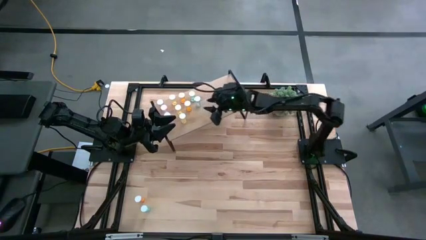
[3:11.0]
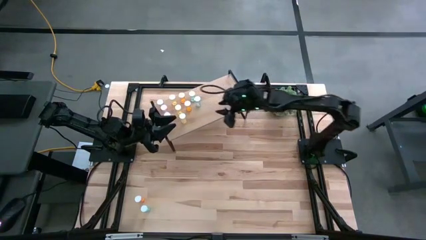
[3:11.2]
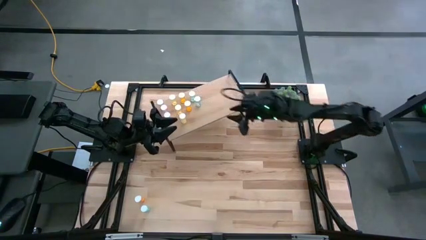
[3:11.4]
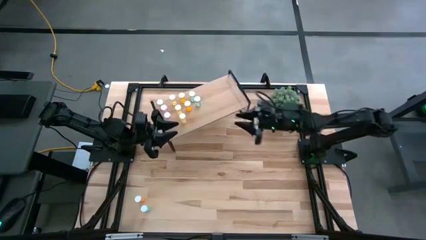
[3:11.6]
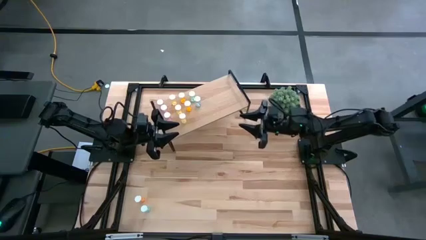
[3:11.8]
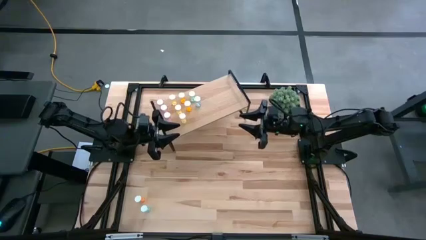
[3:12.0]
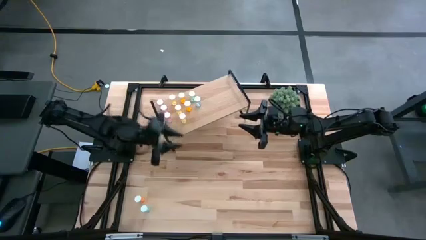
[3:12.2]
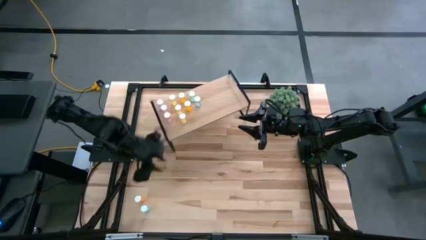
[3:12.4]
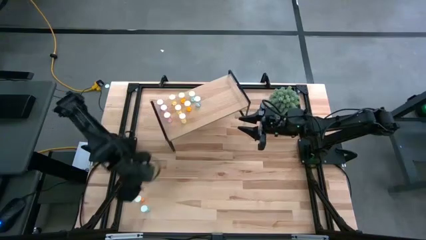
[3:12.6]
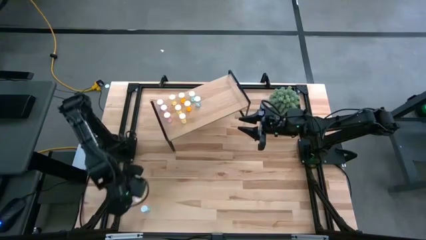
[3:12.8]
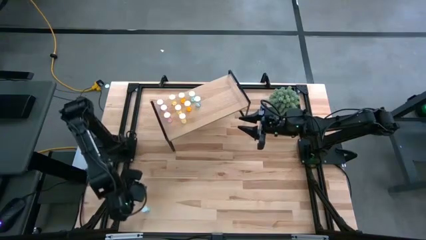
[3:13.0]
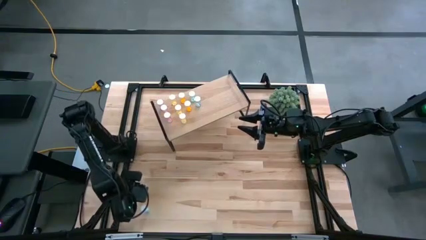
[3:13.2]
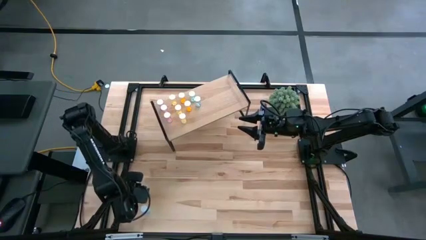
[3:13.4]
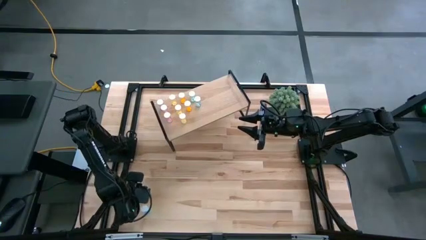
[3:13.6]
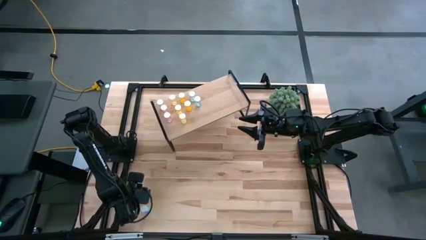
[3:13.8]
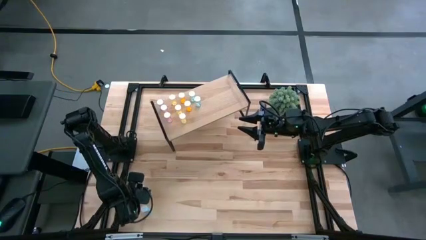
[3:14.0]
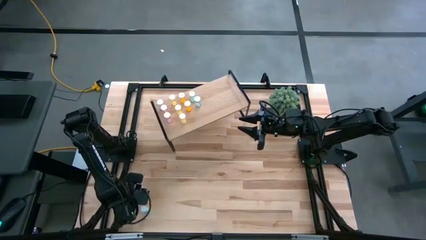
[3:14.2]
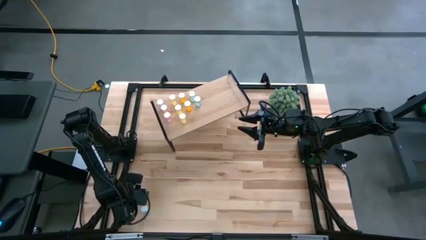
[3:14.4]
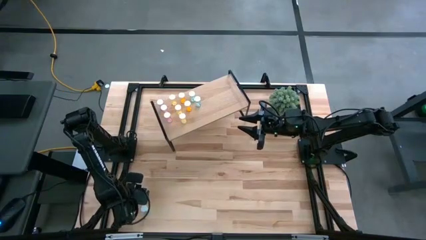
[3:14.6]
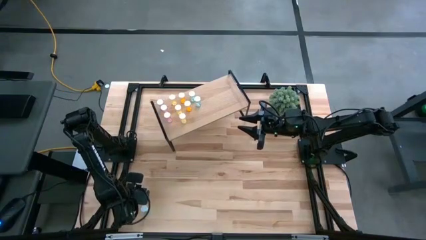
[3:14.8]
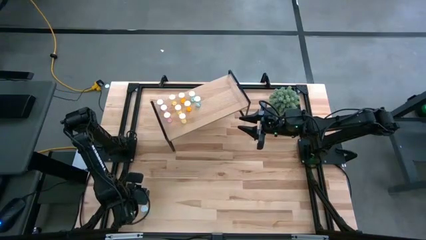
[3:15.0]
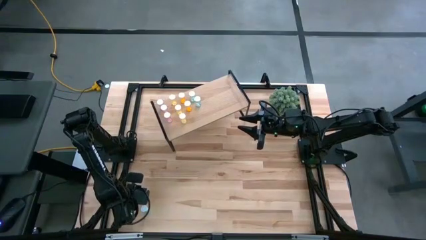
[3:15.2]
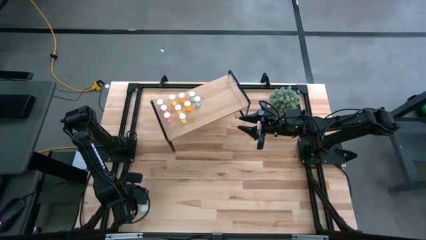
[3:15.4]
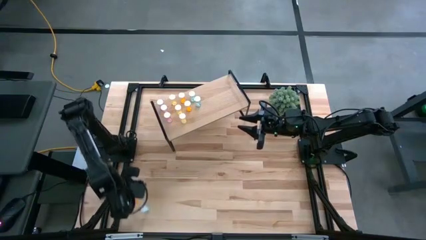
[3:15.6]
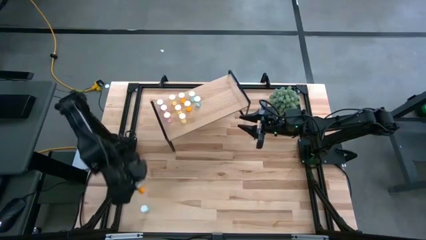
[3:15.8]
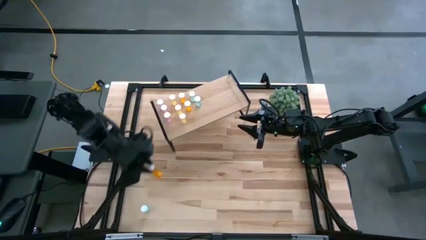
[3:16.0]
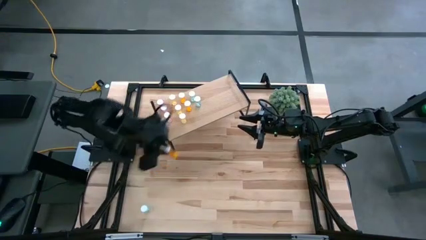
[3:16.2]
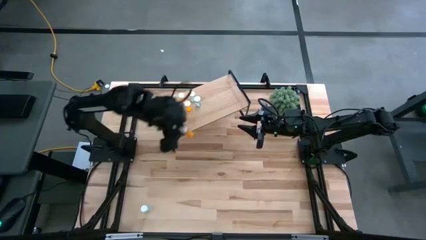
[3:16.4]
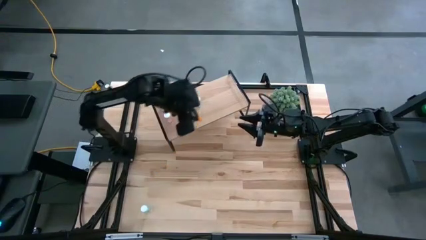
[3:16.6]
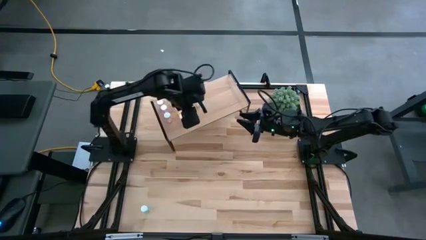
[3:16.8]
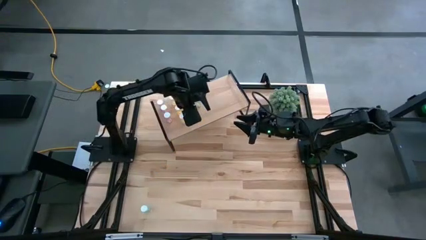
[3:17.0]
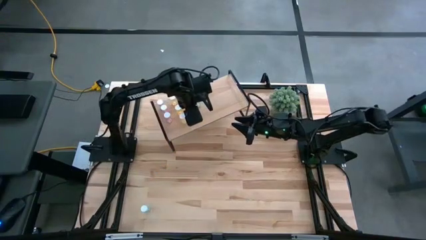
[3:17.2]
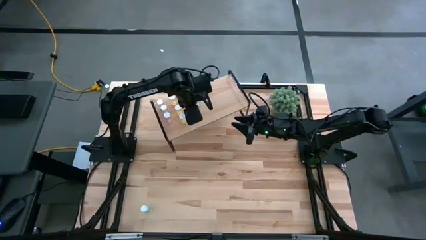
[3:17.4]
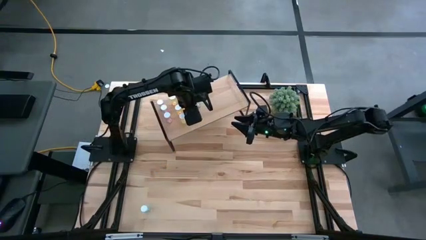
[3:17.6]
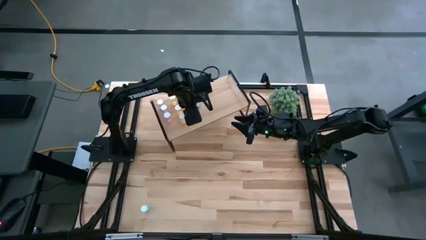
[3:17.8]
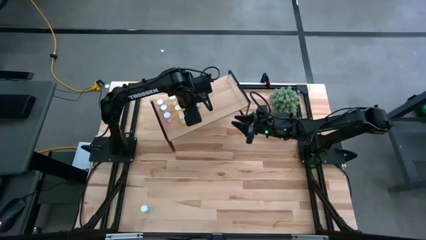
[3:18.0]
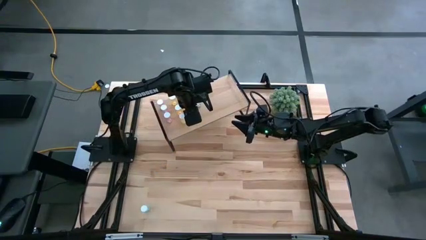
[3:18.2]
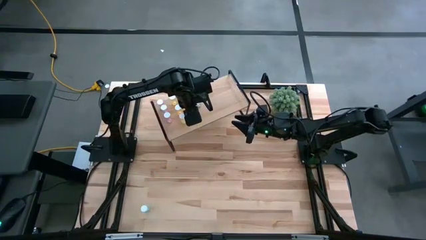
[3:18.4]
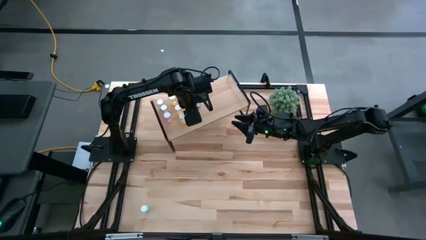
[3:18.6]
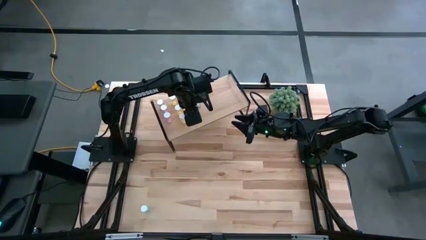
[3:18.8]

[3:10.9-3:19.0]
Task: Pick and place medicine bottles onto shelf by color
Put the orange pill bottle on the shelf aligned with the other orange pill bottles

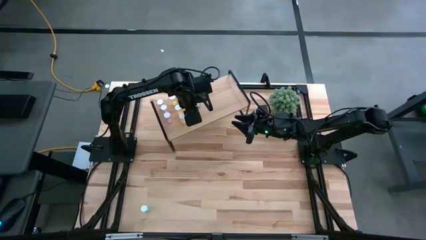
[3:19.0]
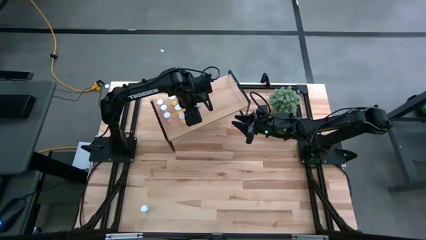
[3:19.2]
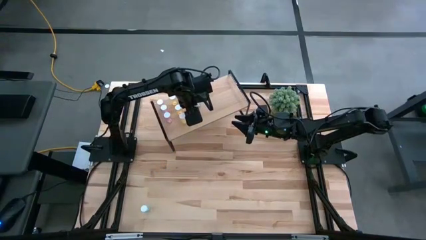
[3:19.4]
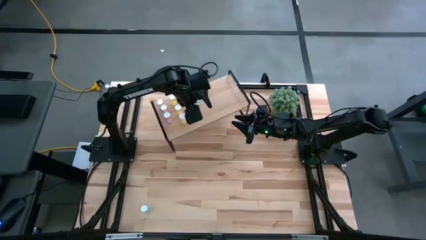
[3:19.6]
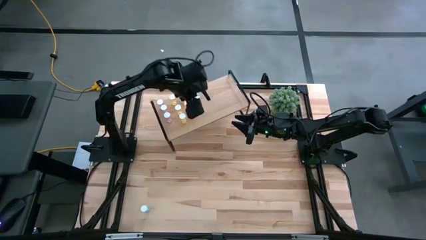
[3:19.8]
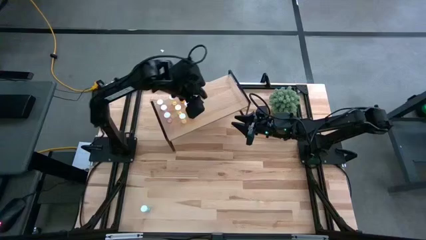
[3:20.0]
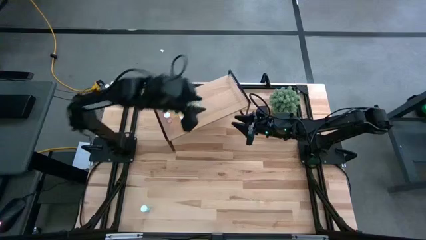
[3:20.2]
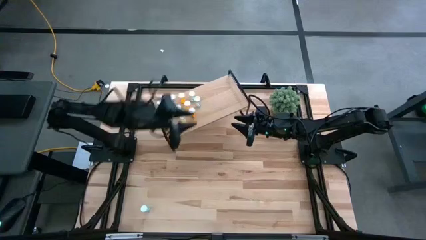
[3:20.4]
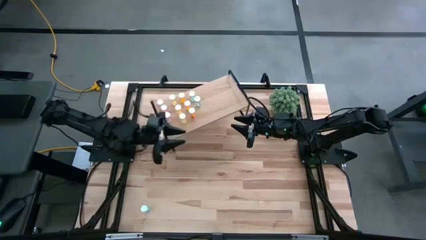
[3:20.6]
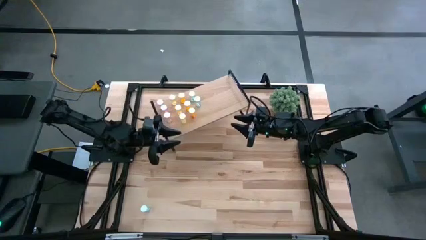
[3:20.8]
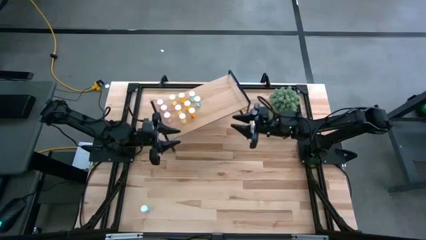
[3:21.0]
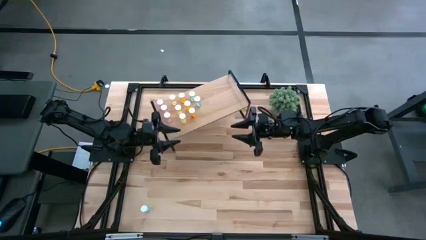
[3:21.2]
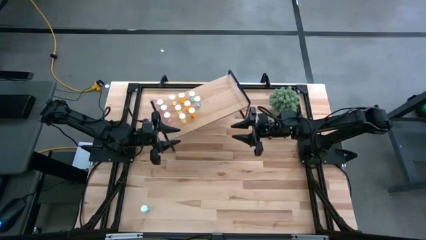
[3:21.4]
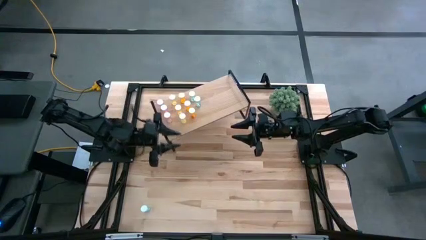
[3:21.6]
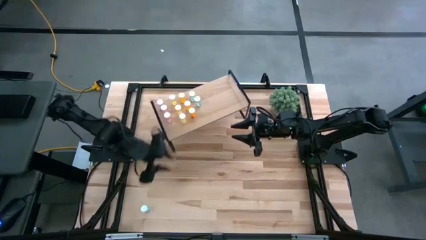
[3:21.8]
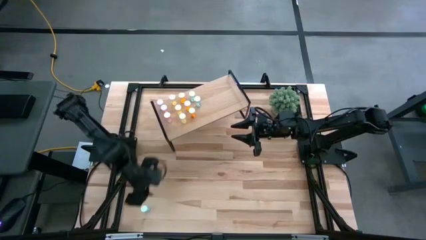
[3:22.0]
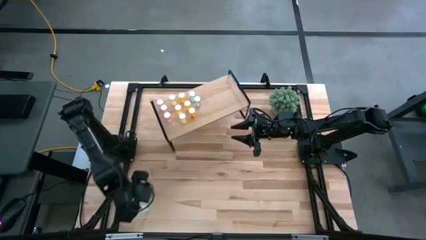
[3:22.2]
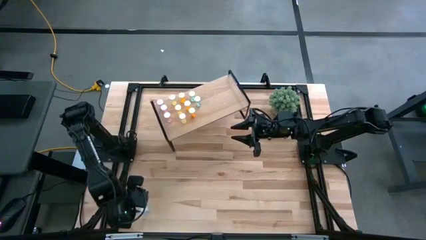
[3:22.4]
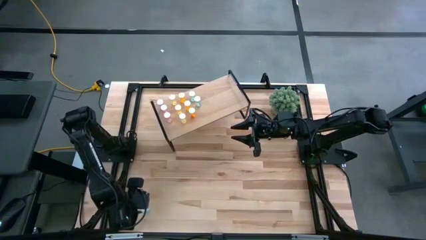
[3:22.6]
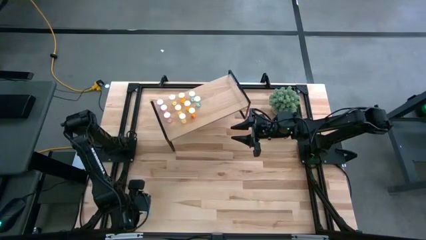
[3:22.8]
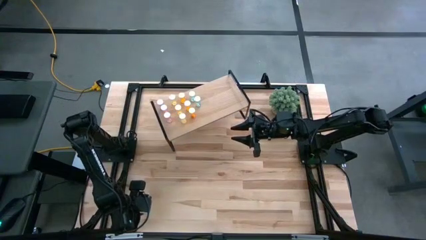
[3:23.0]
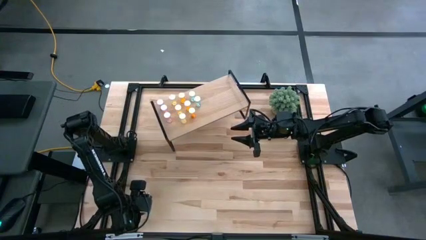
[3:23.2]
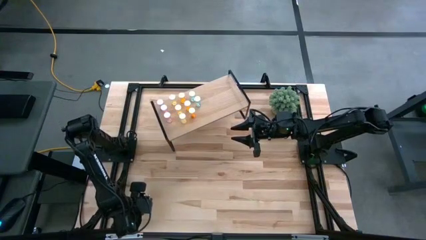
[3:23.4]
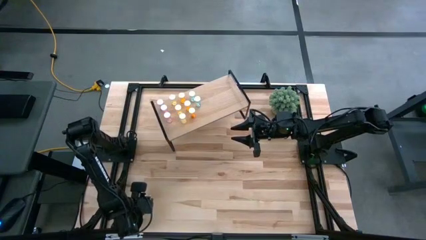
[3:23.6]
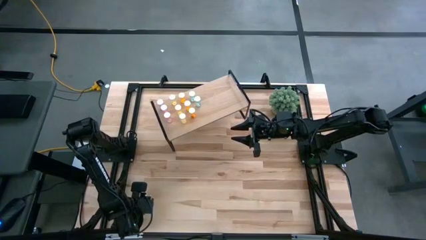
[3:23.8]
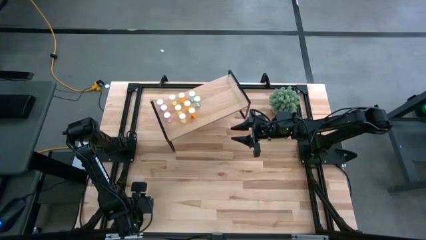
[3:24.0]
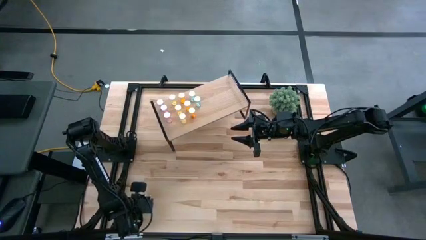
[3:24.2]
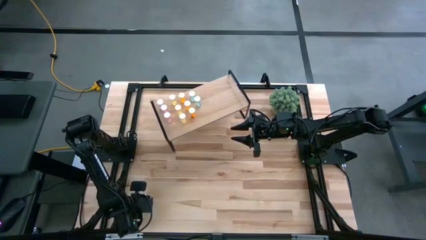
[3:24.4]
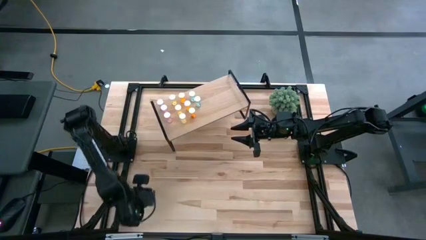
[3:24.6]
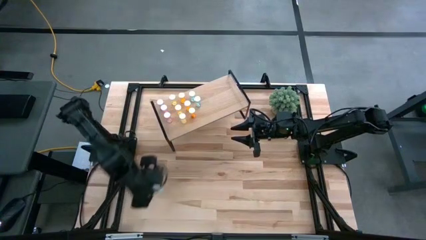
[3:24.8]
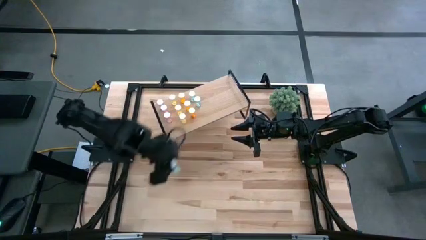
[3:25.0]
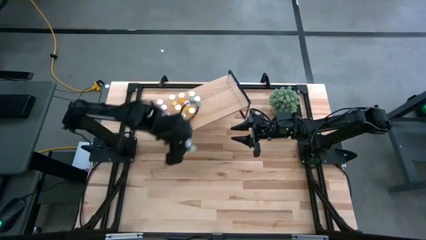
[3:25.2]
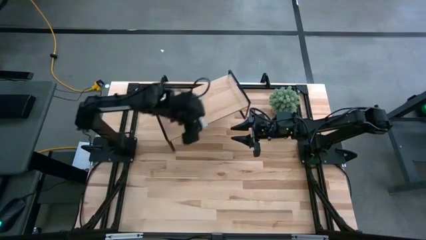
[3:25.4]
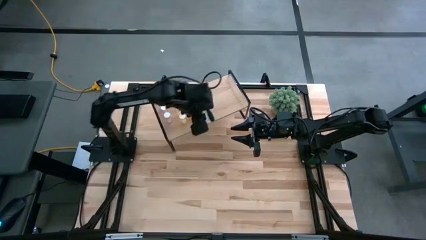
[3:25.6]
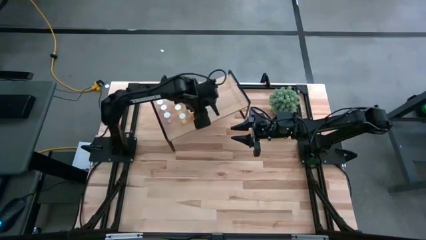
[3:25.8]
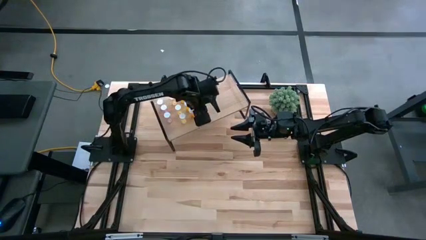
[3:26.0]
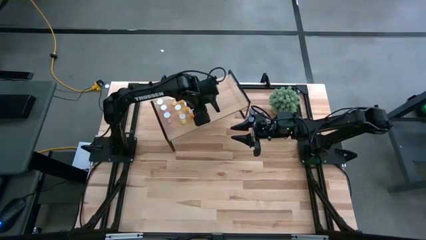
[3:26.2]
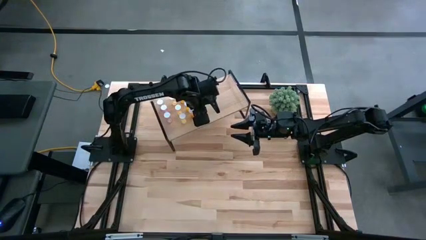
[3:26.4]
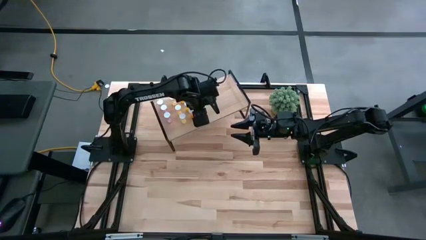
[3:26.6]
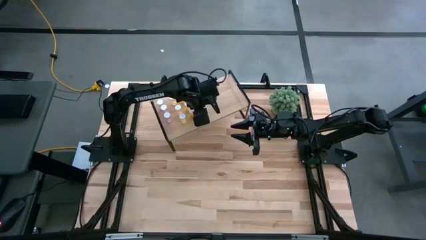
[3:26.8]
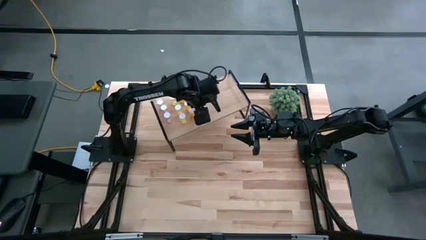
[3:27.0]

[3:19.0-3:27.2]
Put the blue pill bottle on the shelf aligned with the other blue pill bottles
